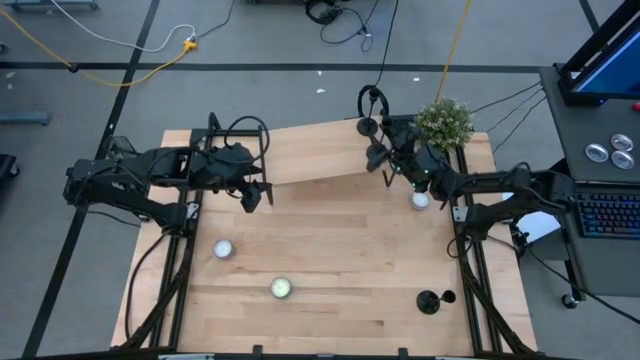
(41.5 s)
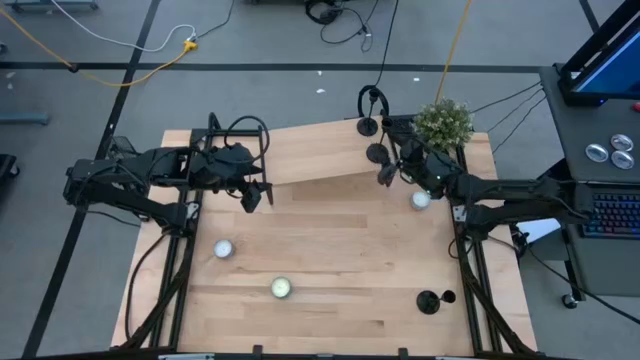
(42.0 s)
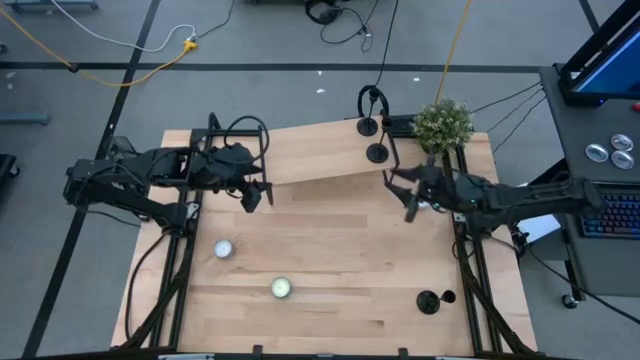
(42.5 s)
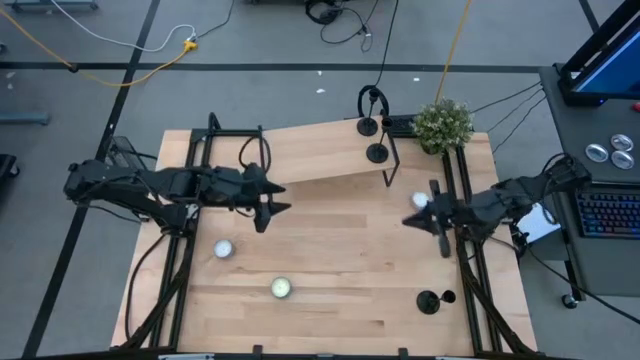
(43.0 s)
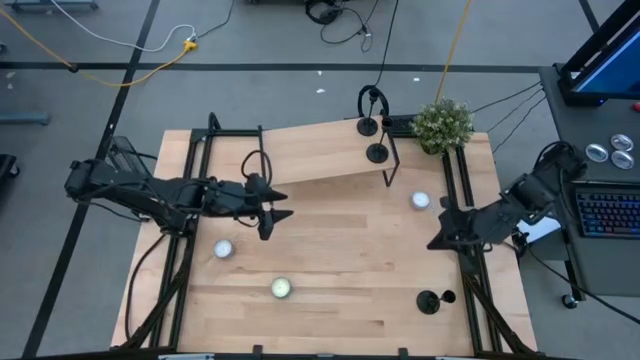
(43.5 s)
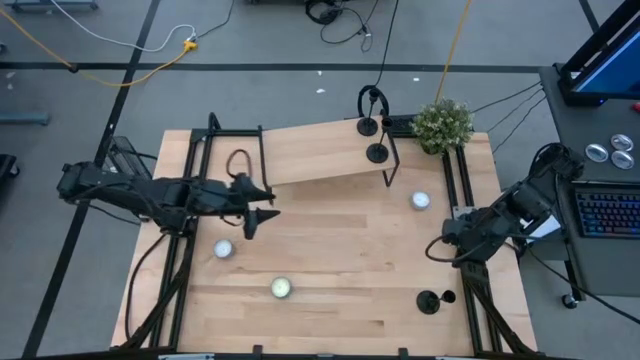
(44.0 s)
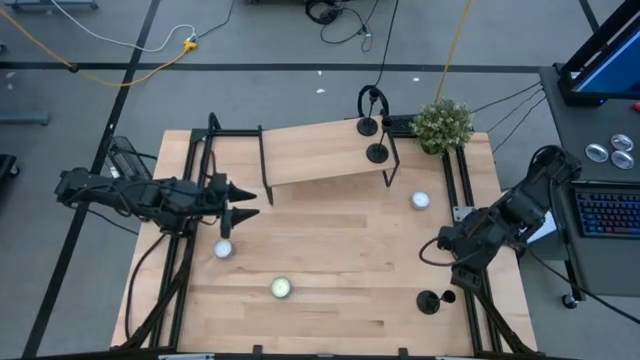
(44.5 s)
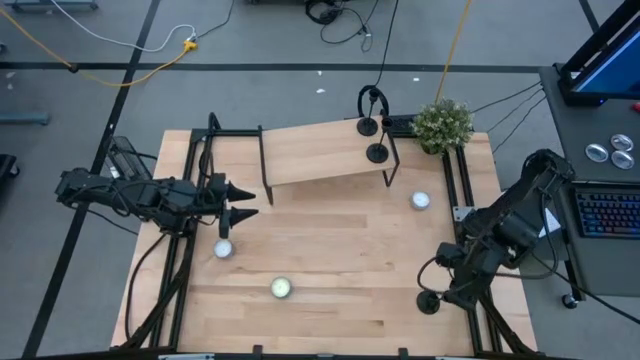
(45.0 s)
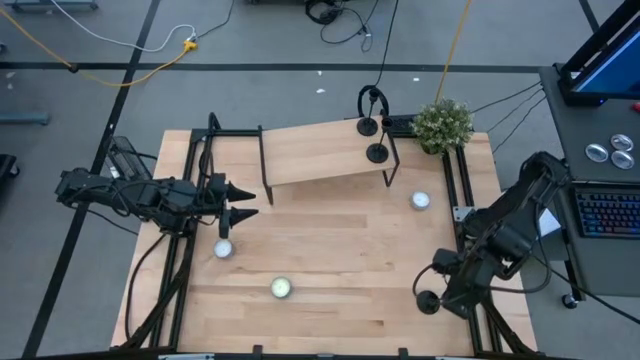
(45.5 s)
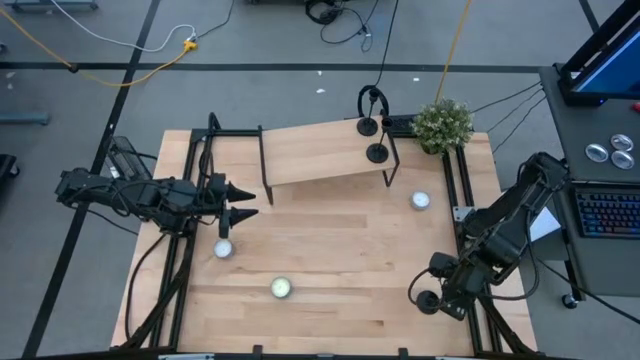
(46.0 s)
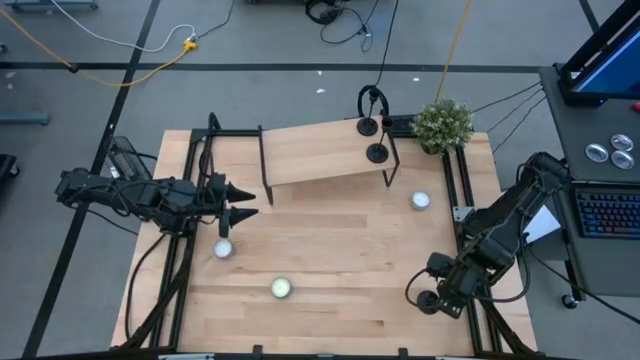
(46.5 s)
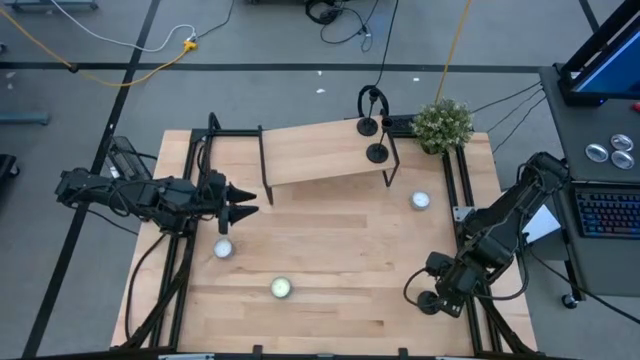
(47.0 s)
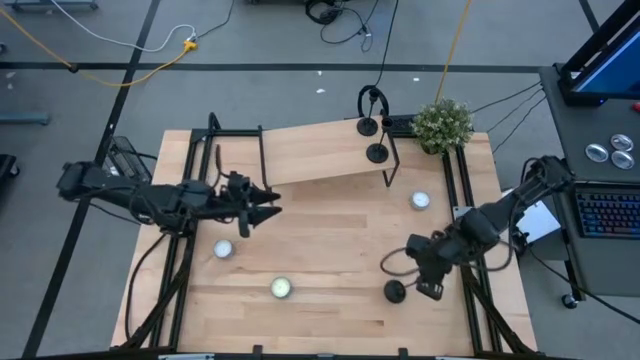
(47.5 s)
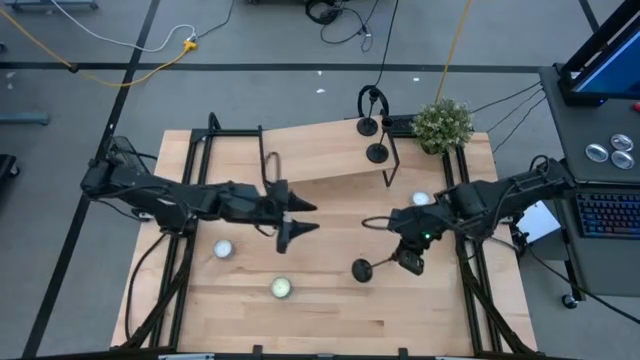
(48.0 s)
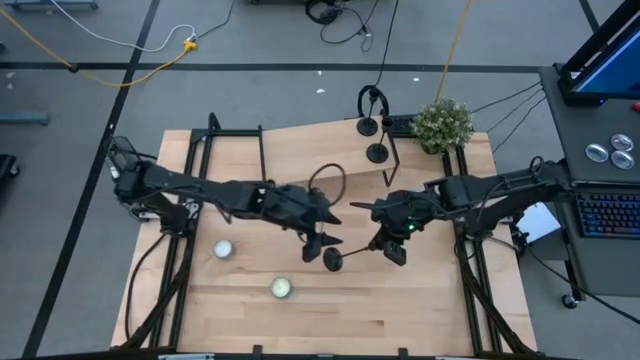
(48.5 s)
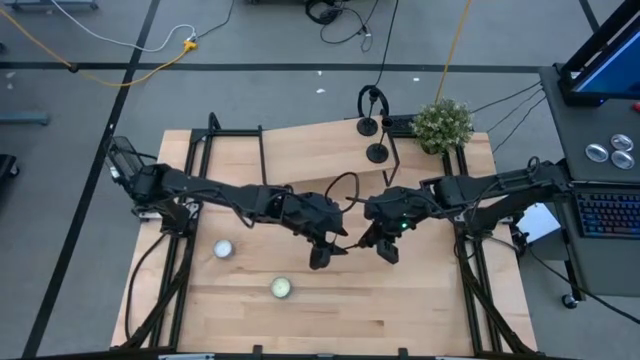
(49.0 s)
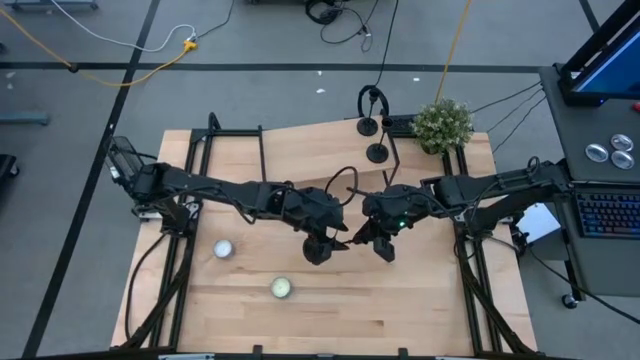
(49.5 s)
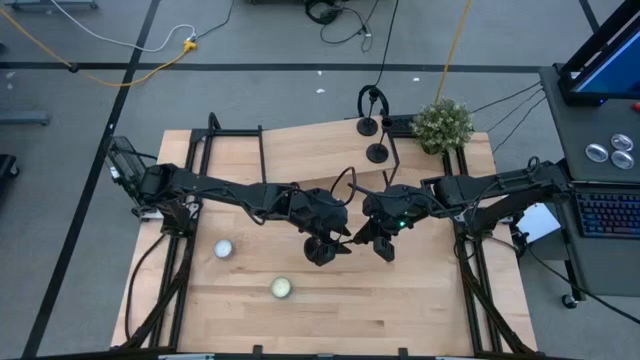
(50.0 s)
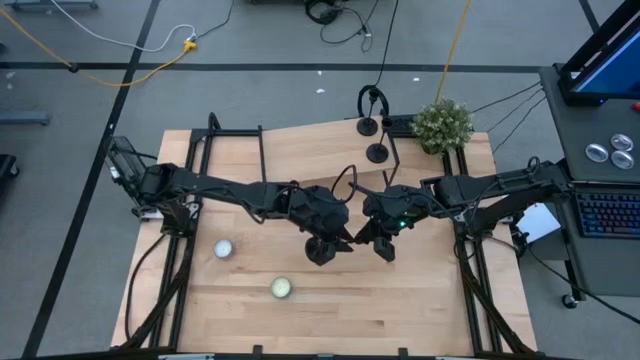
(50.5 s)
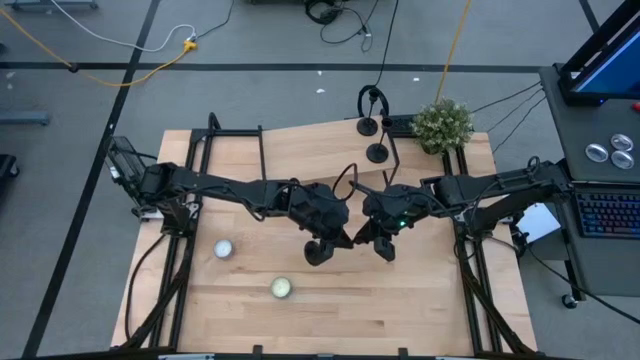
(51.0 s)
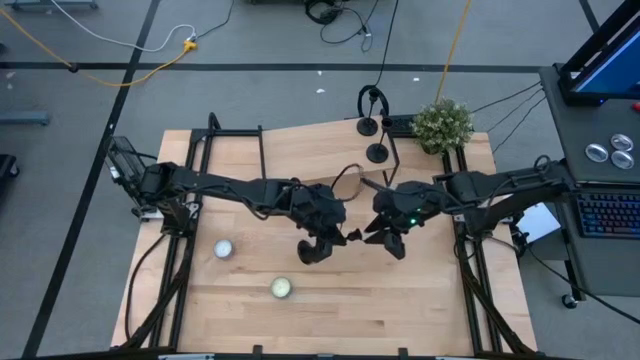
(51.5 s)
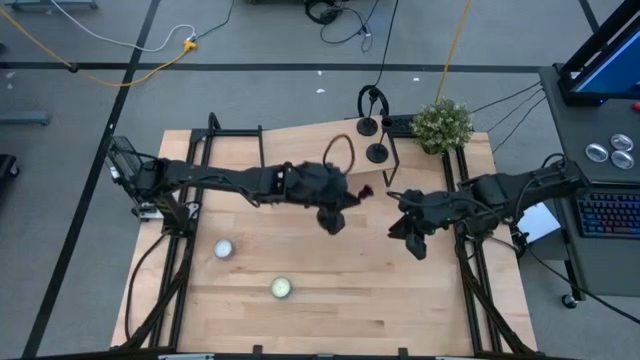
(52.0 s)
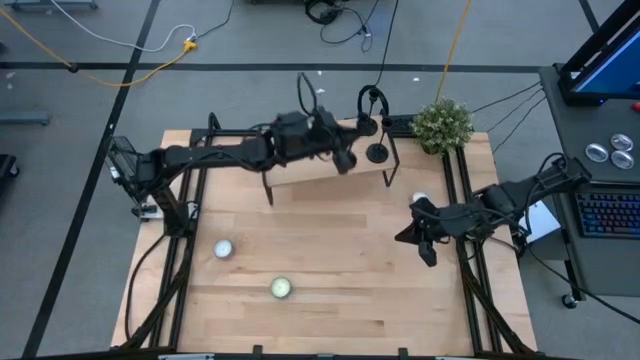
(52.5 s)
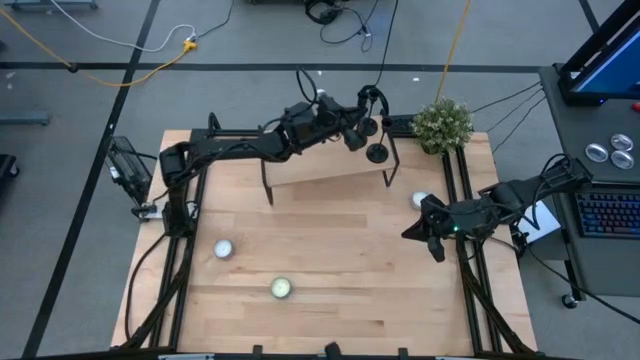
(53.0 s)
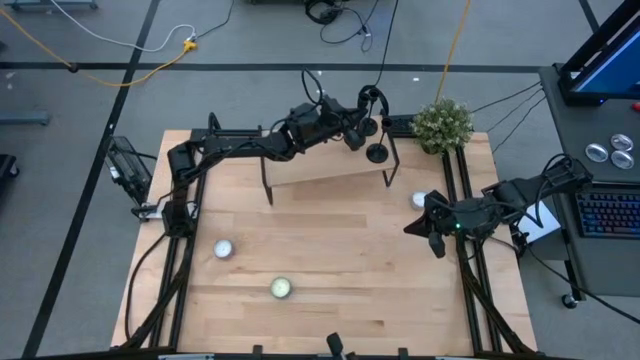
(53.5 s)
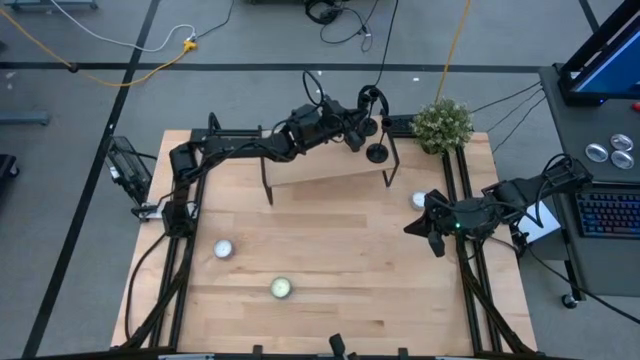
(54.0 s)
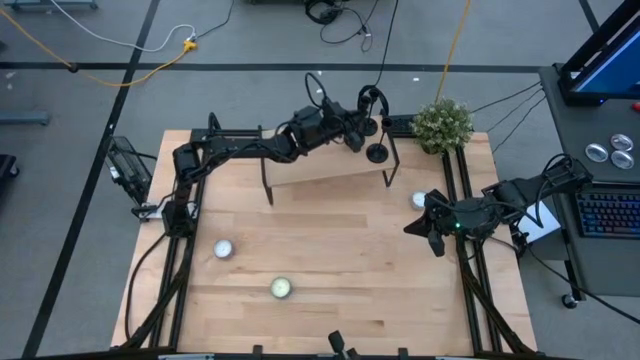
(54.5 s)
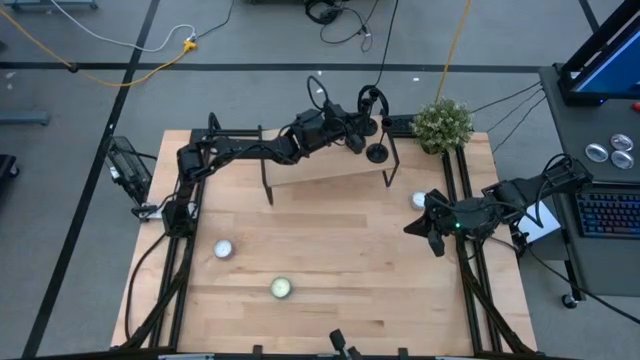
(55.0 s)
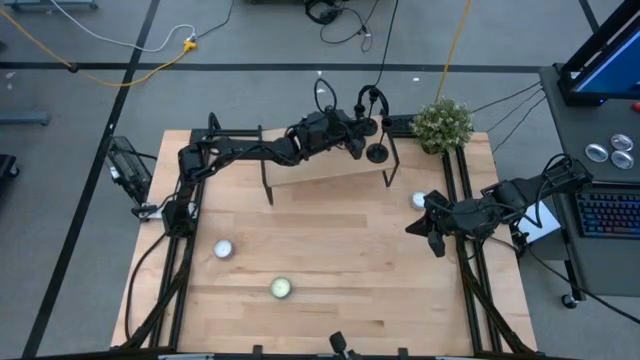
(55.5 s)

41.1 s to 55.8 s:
Task: Pick & Place candle stick holders
Put the black candle holder on the shelf

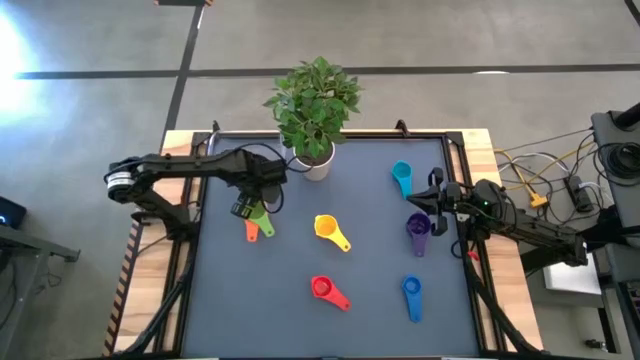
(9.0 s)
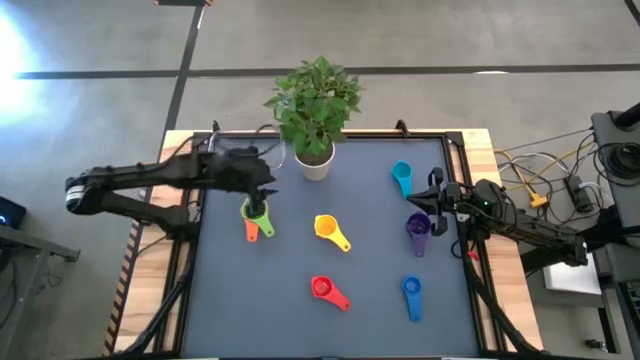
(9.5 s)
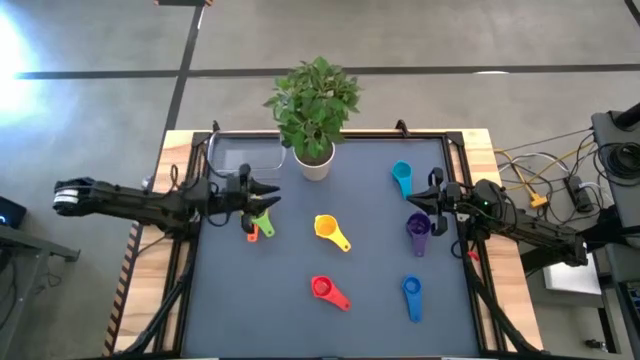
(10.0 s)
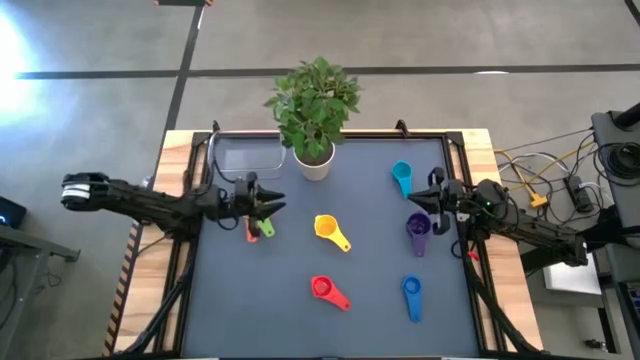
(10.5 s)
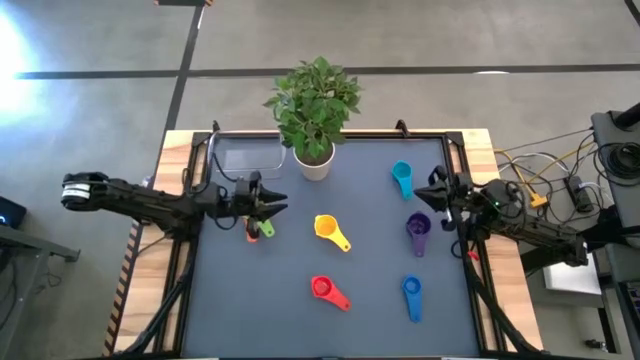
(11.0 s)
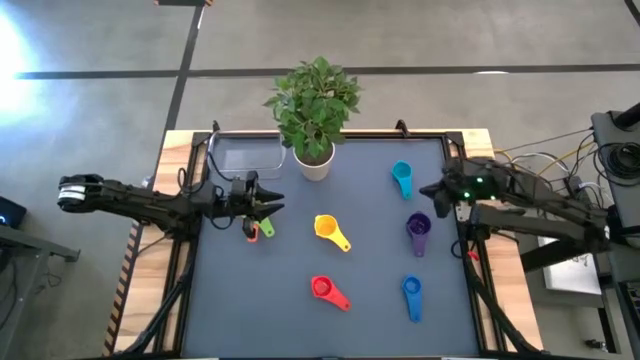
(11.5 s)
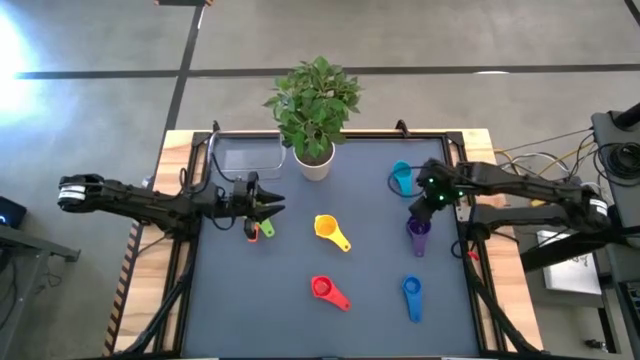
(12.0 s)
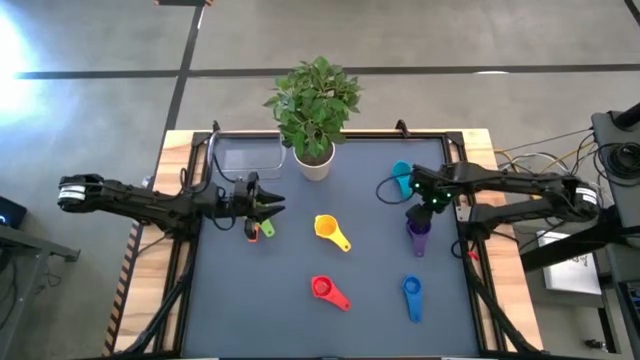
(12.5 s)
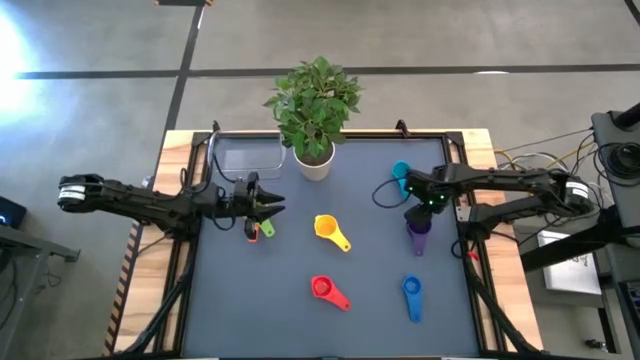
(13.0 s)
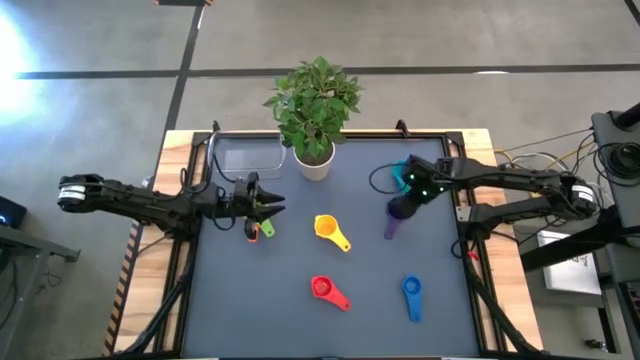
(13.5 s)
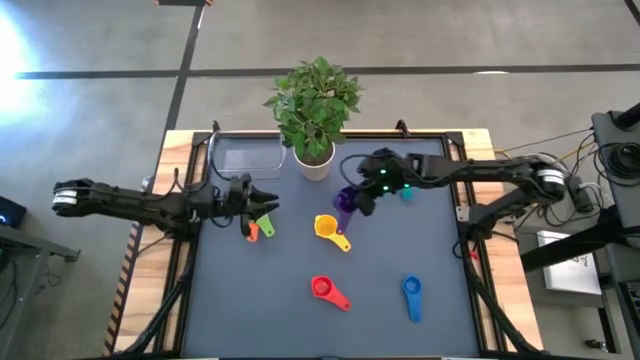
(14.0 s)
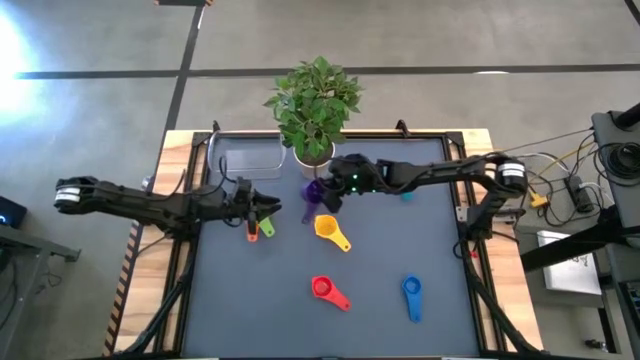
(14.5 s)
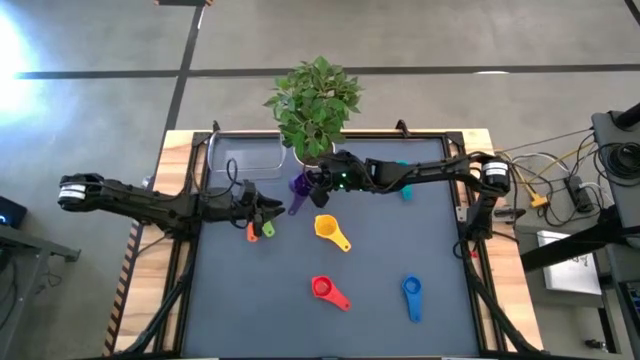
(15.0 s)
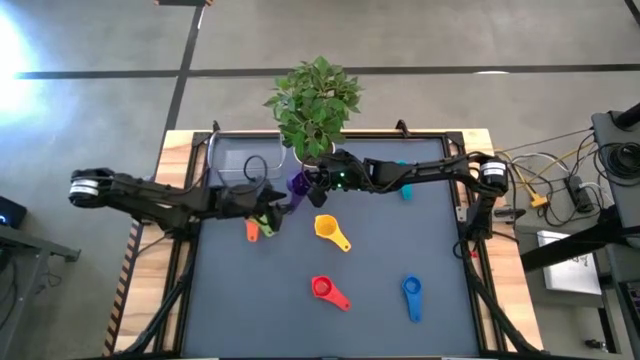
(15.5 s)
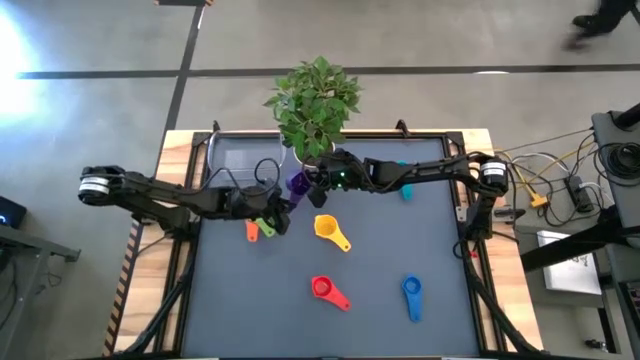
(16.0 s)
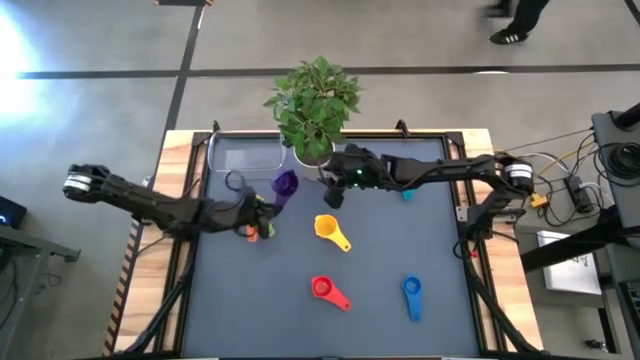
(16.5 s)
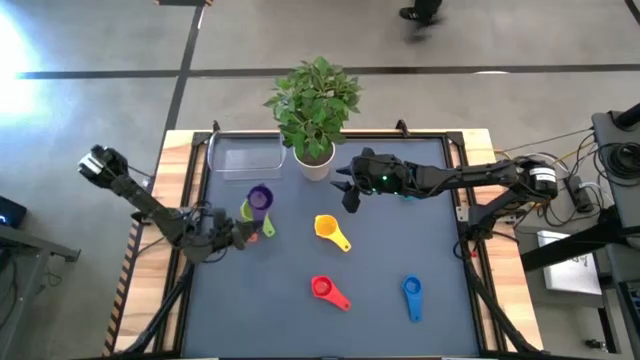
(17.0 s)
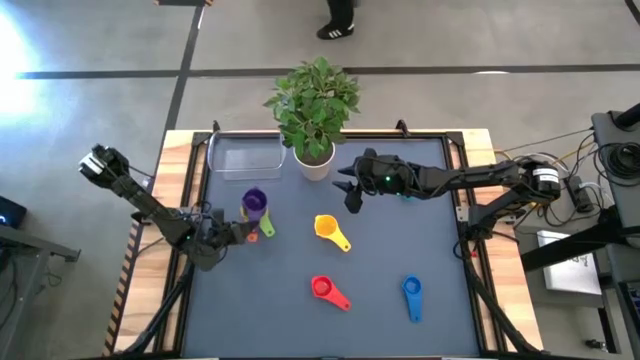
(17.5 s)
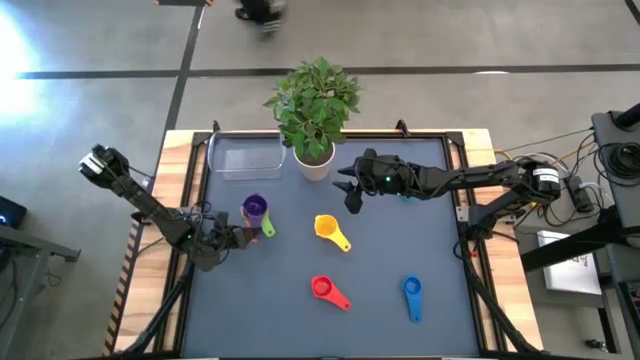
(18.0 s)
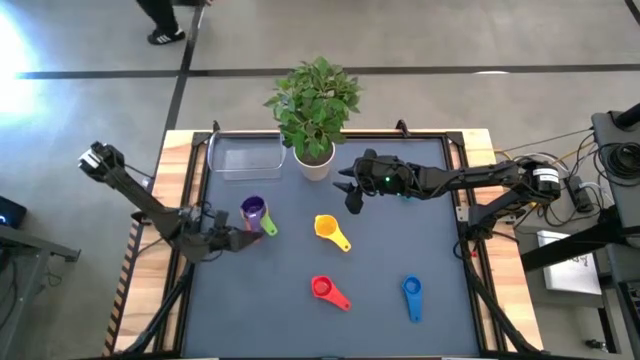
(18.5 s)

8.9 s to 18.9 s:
Task: Nest measuring cups in basket
Stack the violet measuring cup on top of the green measuring cup
